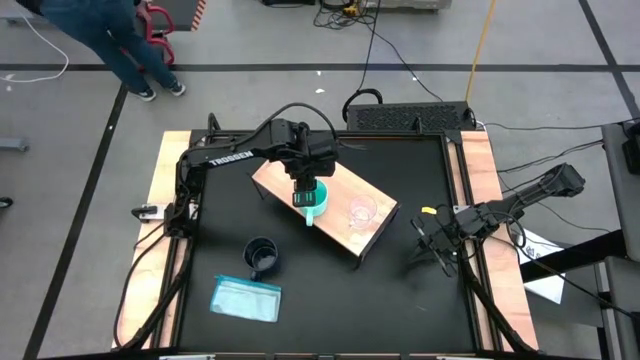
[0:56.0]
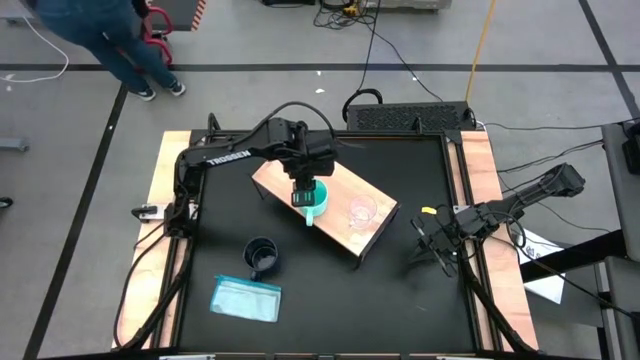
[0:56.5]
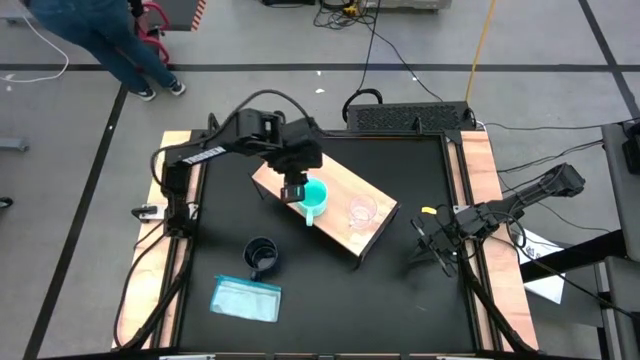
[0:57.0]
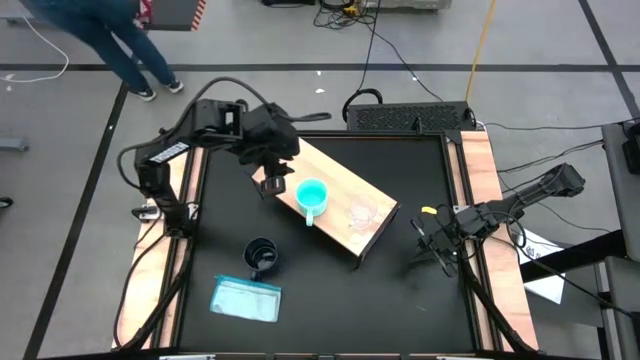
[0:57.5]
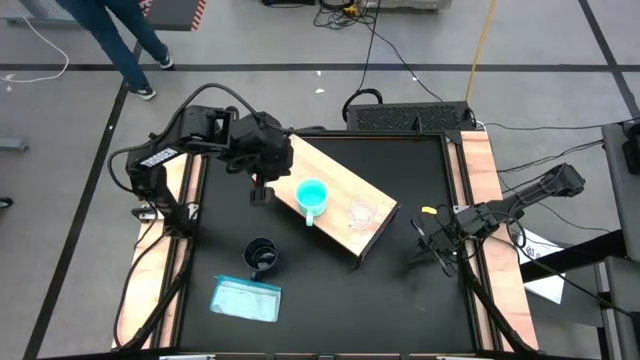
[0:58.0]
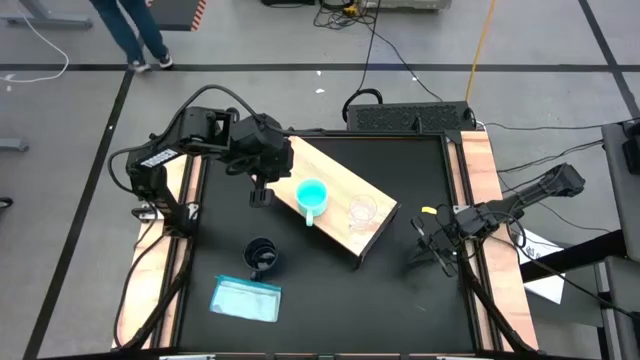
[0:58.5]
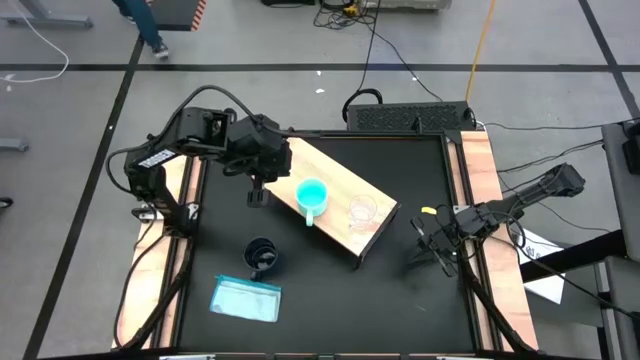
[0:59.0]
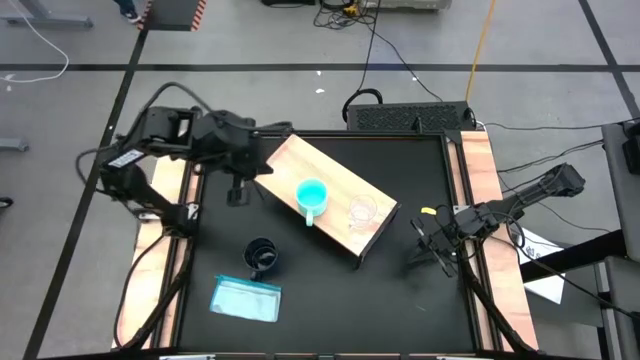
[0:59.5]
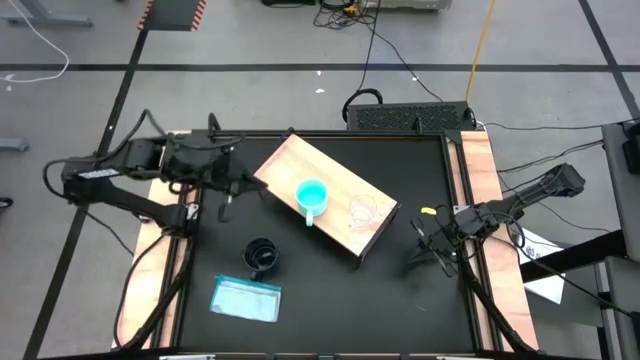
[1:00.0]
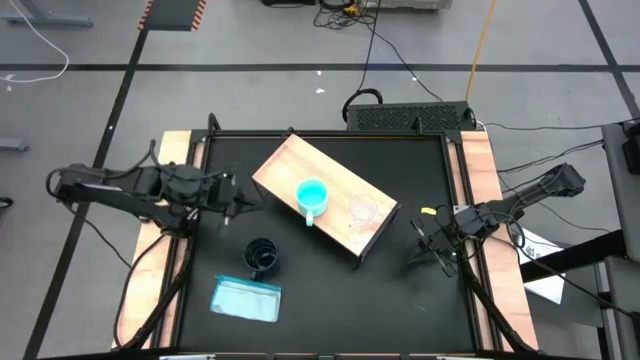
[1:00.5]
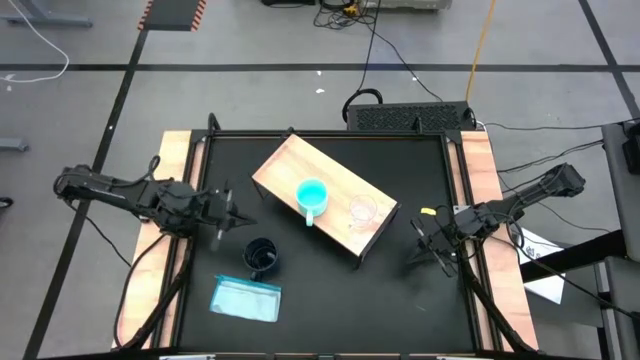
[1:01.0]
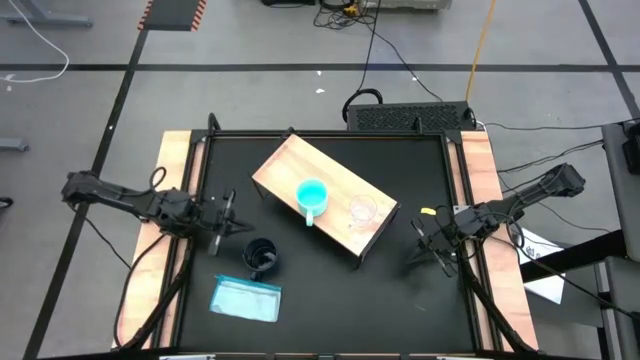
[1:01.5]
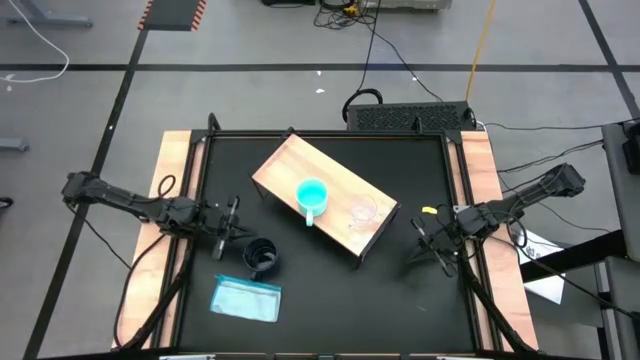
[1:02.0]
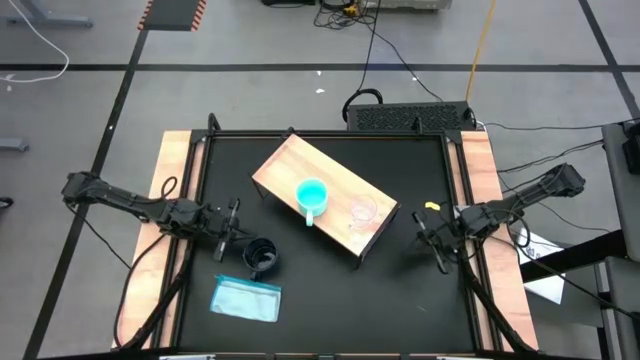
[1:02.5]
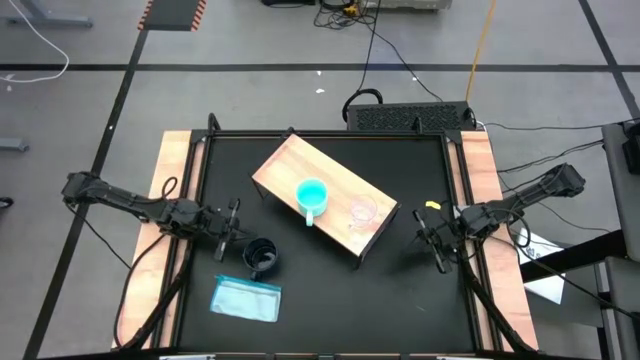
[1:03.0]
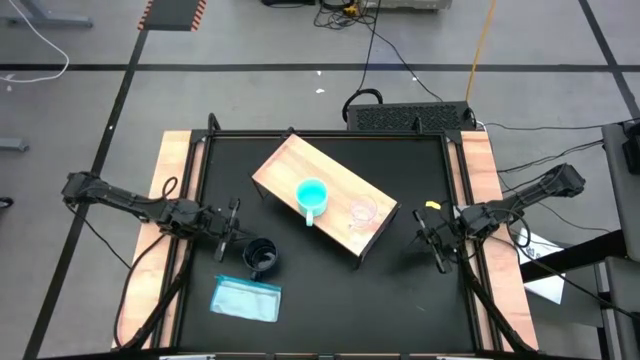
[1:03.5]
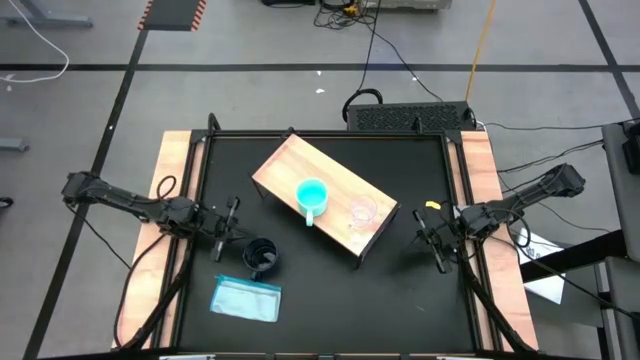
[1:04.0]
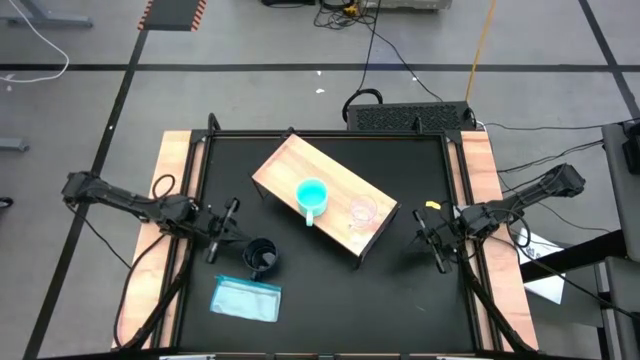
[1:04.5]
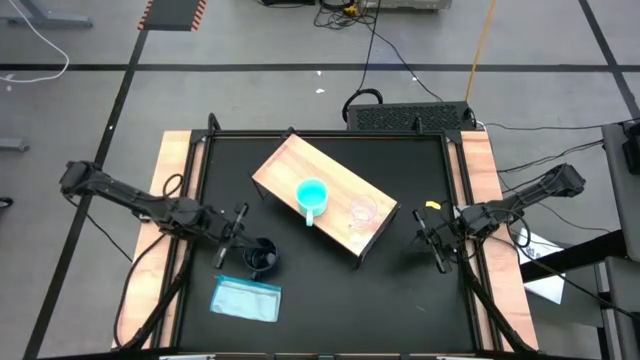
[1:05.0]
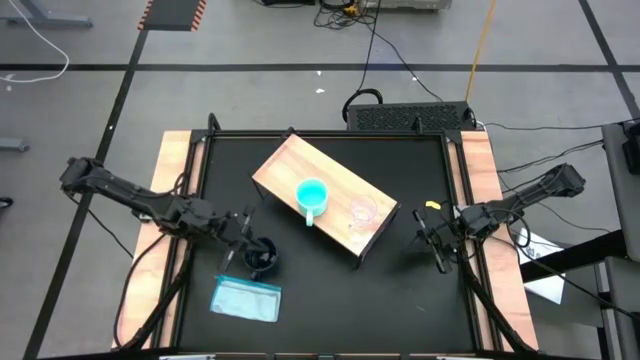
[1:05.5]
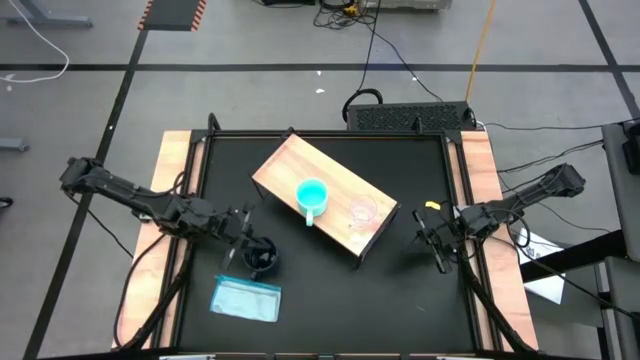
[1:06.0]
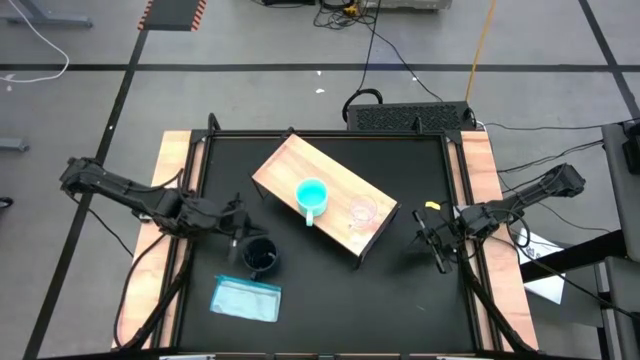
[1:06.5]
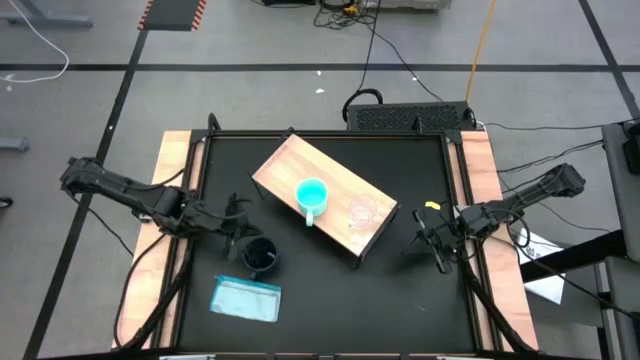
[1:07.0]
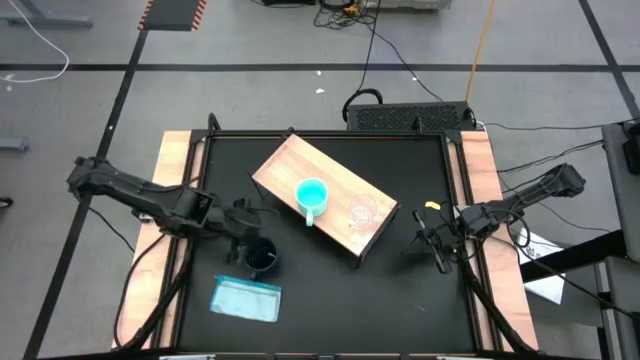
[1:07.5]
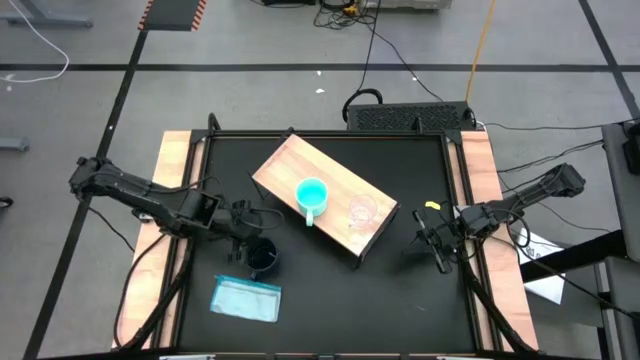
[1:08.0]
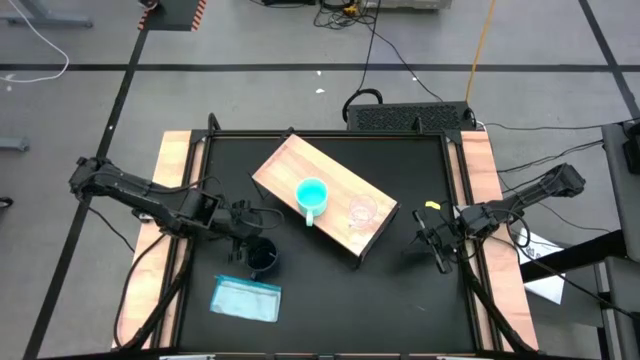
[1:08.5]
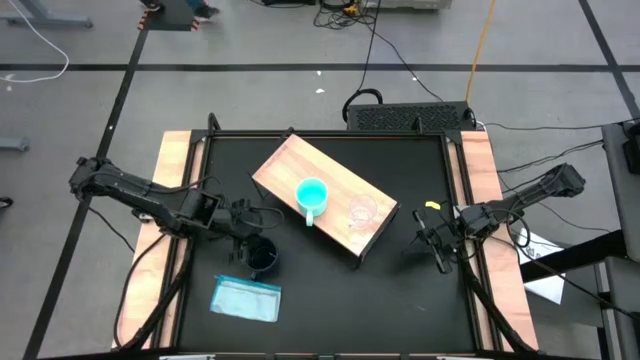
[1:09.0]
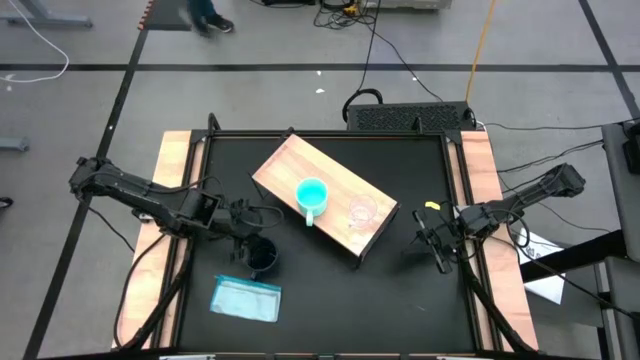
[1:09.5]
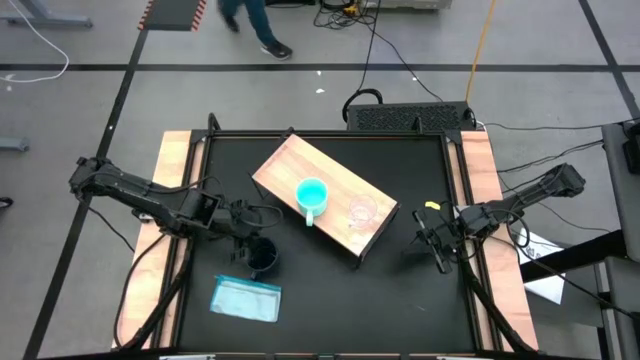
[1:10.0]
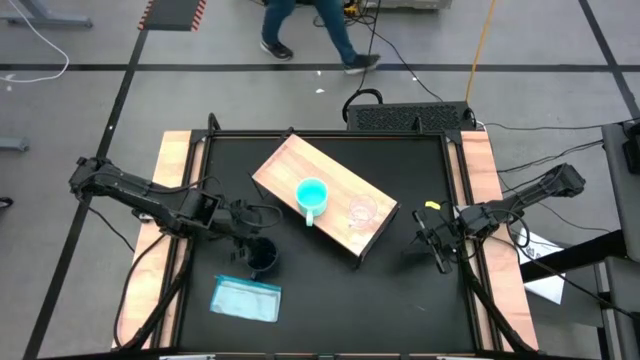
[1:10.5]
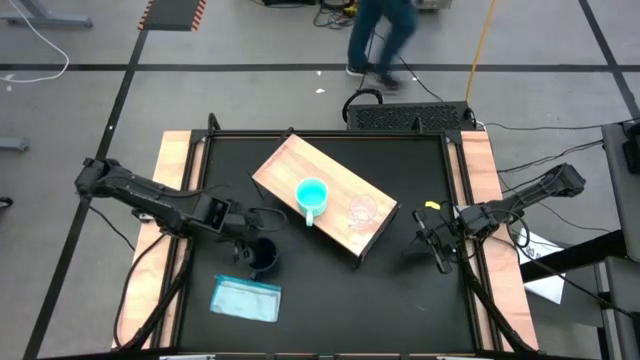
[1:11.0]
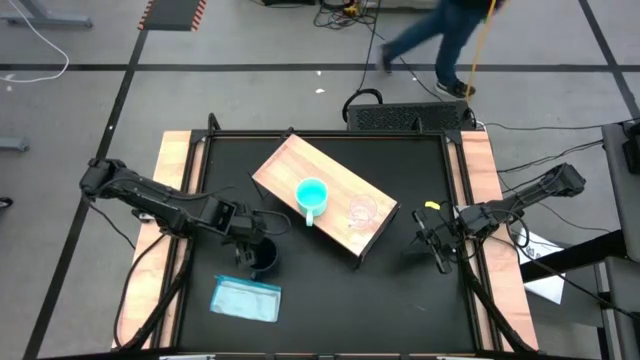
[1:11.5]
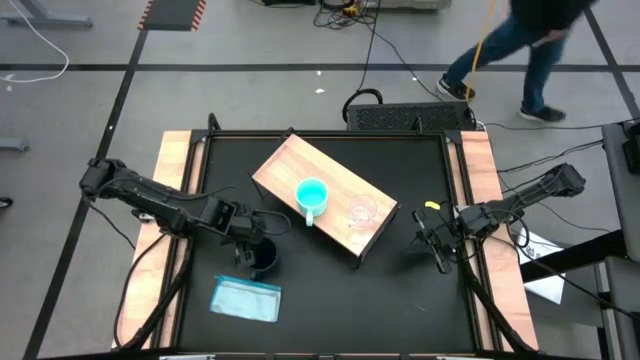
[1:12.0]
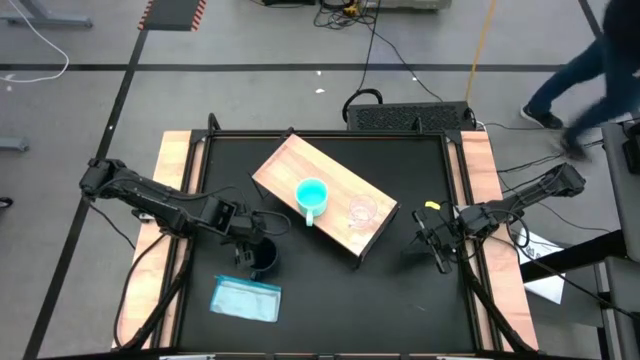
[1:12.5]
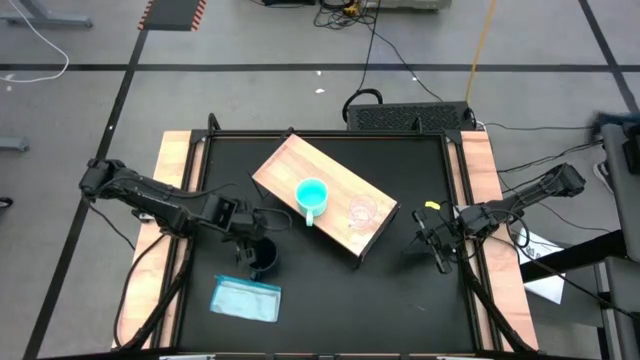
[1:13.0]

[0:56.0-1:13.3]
Task: Stack small to large cups/mugs on shelf
Put the dark blue mug on the shelf

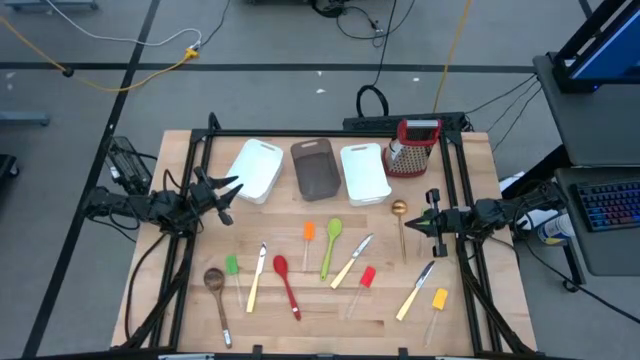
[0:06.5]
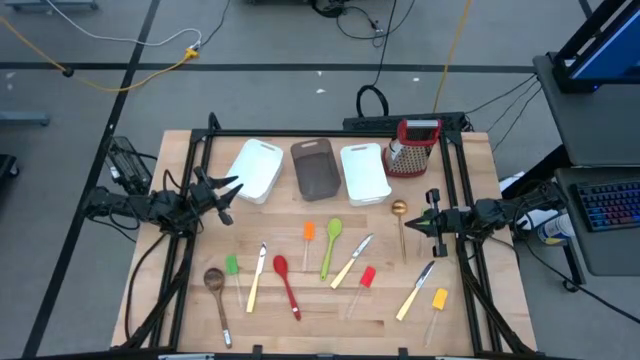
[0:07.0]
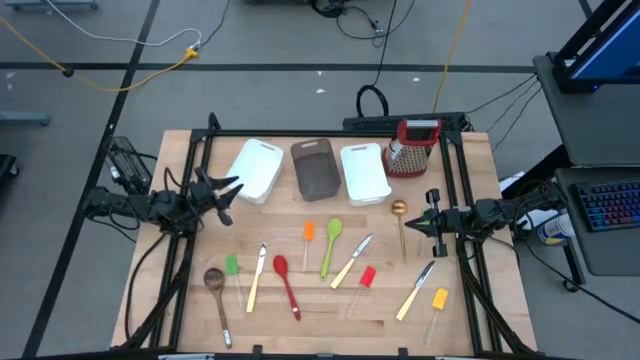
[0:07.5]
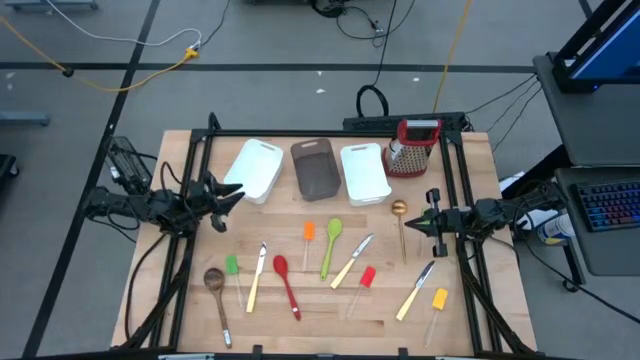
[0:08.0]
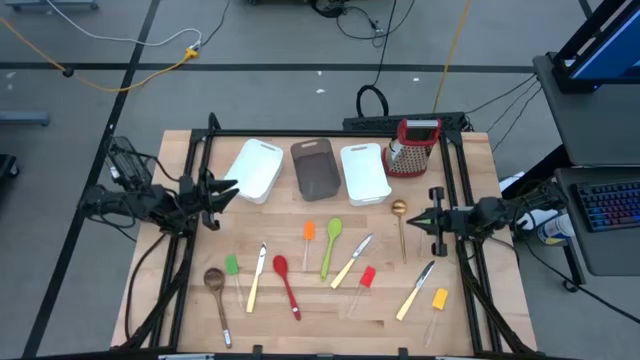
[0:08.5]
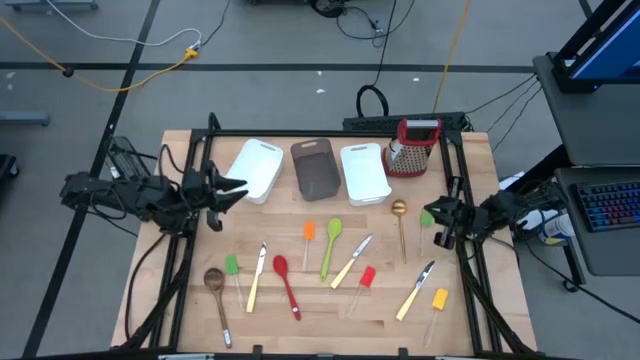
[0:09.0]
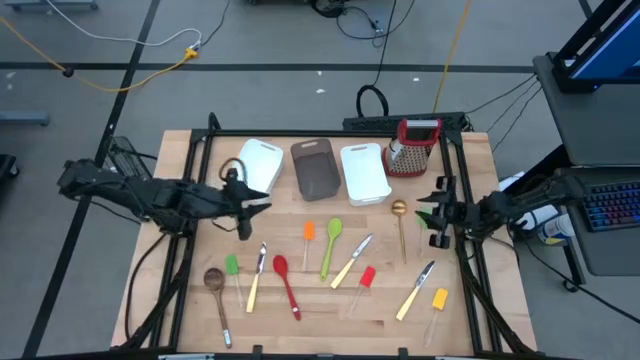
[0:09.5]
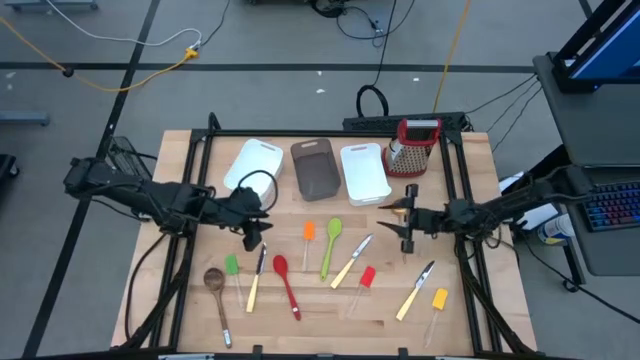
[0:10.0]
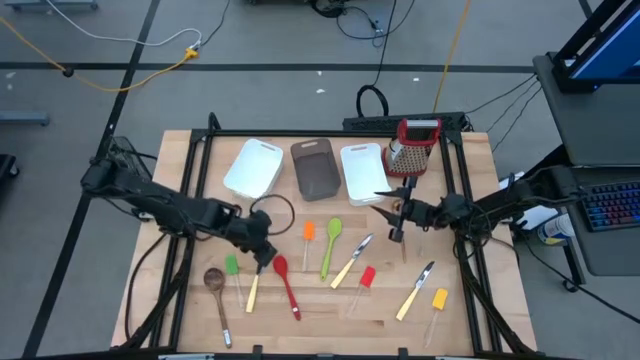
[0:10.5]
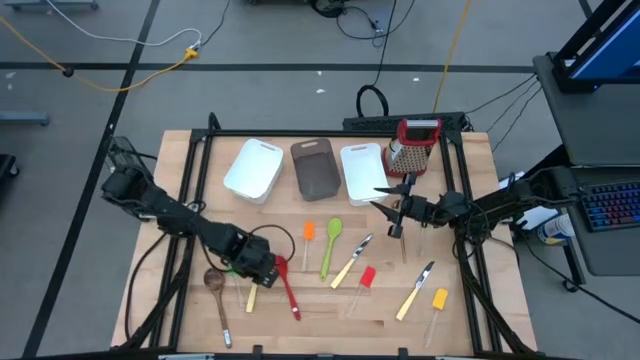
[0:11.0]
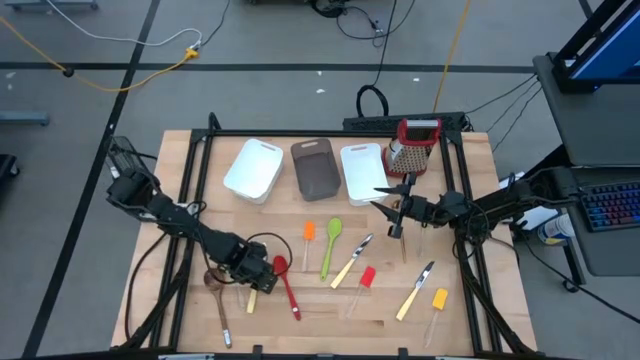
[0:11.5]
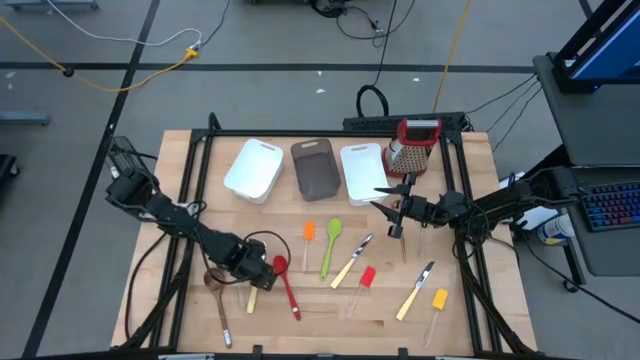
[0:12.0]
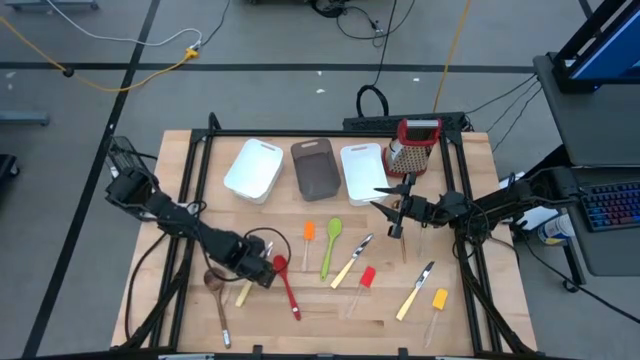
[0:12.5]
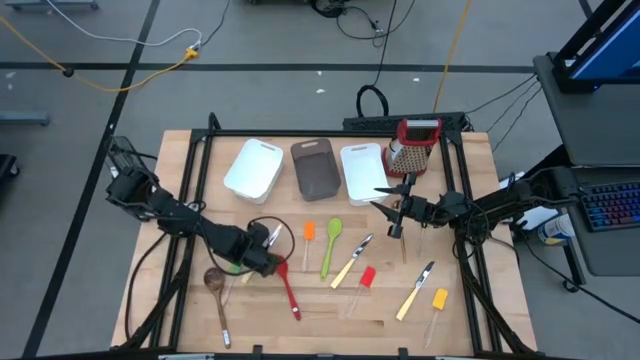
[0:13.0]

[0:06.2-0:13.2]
Task: Pick & Place Kitchen Items
Put the bottom left yellow knife into the left white bin
